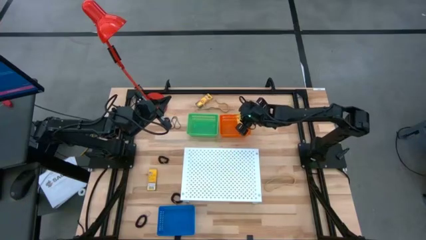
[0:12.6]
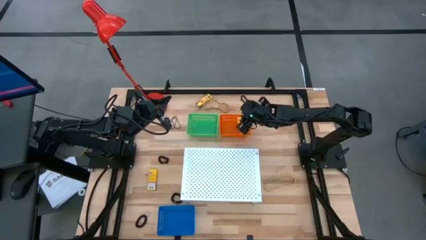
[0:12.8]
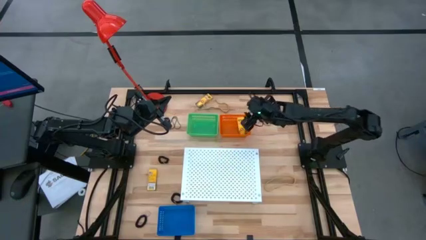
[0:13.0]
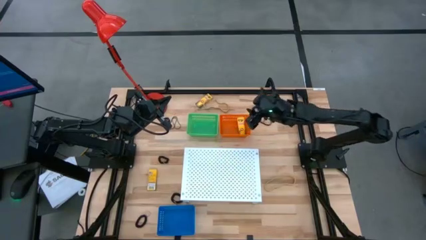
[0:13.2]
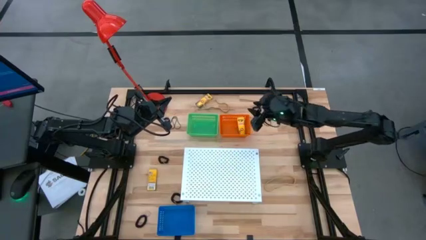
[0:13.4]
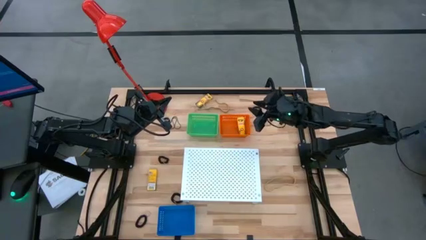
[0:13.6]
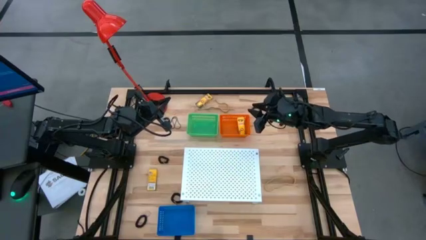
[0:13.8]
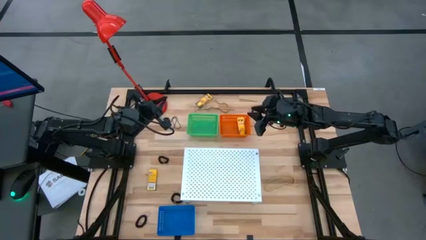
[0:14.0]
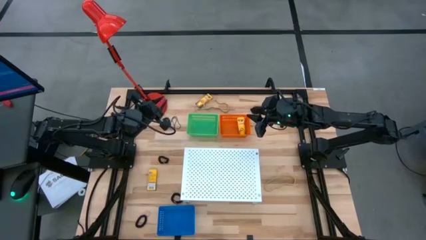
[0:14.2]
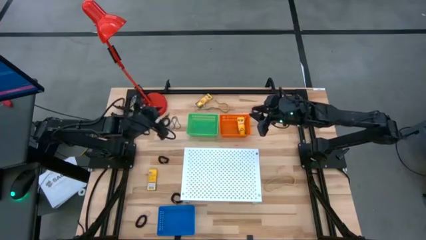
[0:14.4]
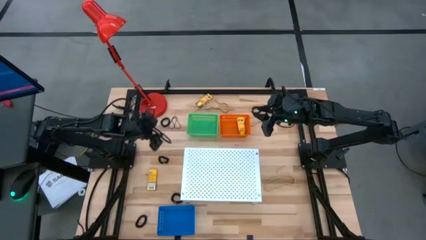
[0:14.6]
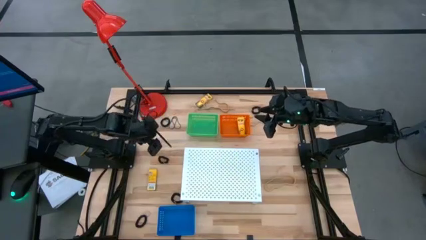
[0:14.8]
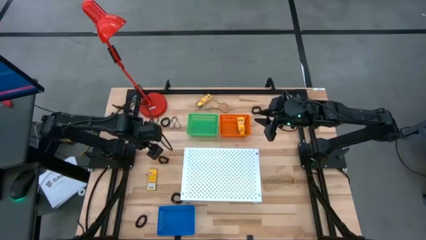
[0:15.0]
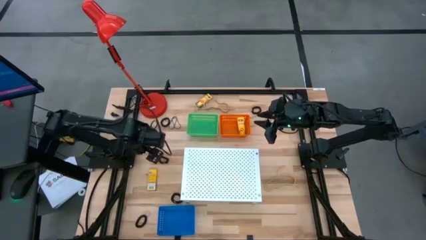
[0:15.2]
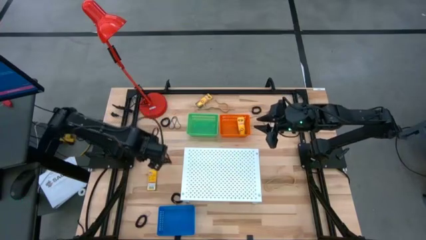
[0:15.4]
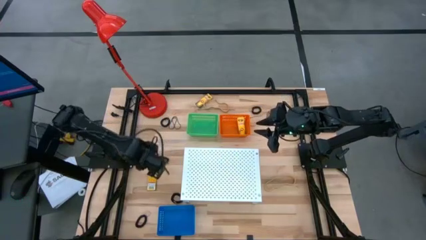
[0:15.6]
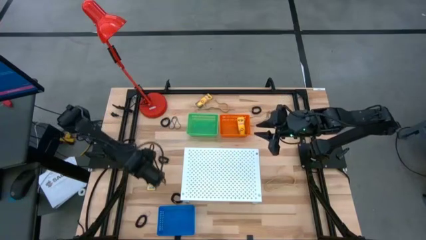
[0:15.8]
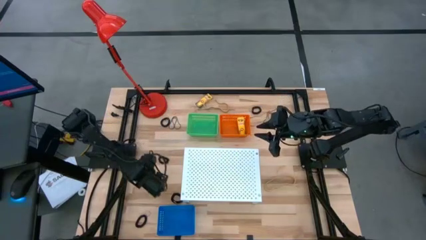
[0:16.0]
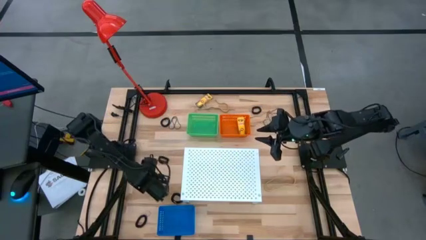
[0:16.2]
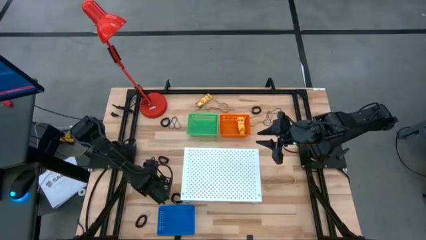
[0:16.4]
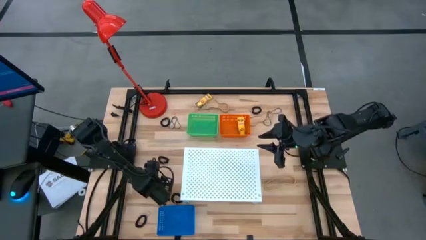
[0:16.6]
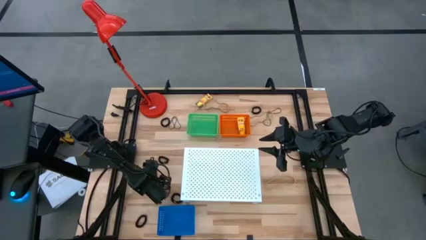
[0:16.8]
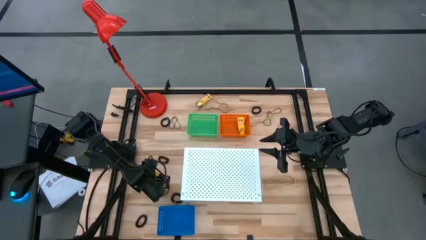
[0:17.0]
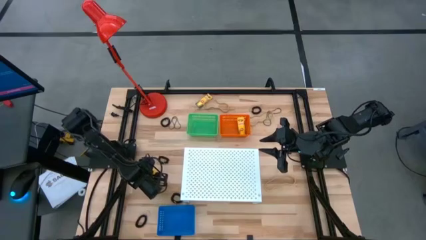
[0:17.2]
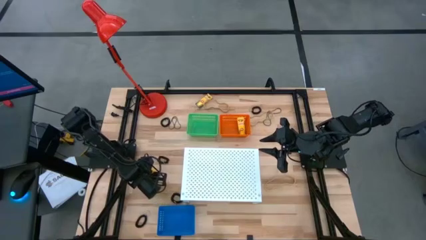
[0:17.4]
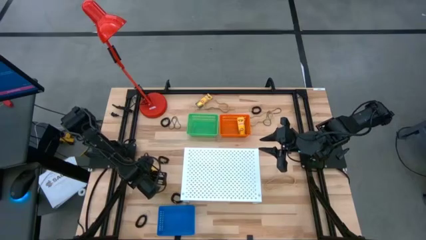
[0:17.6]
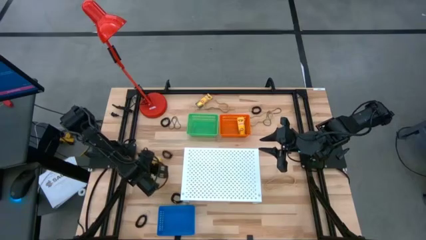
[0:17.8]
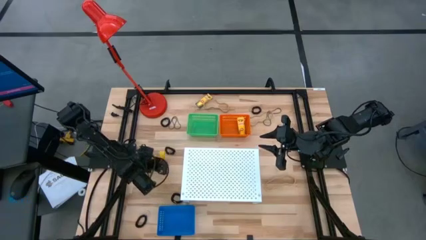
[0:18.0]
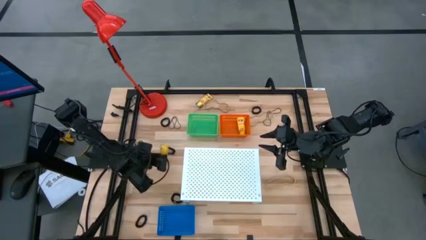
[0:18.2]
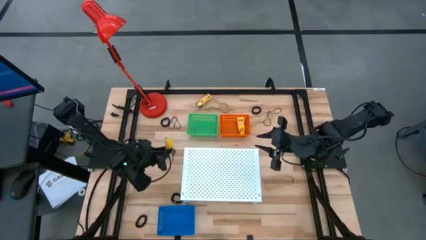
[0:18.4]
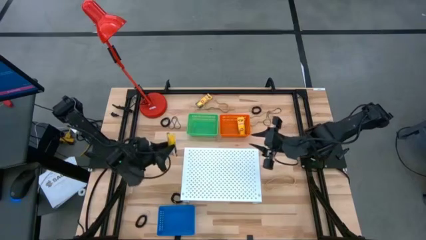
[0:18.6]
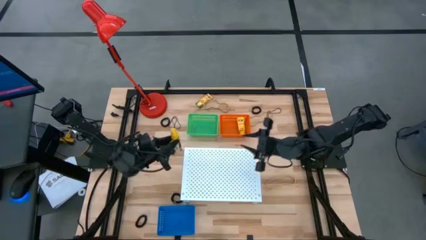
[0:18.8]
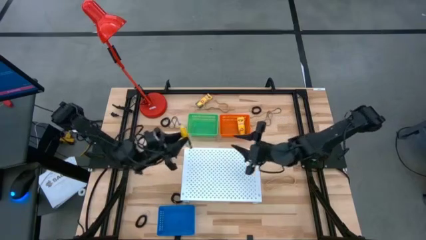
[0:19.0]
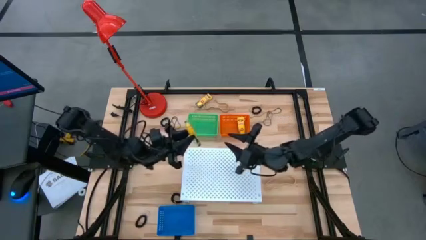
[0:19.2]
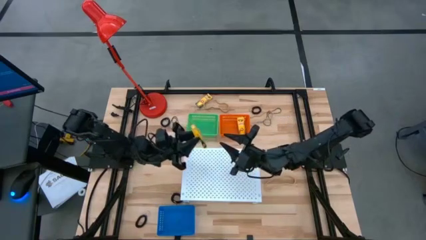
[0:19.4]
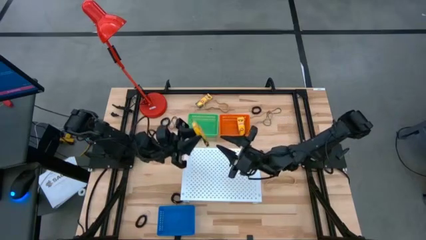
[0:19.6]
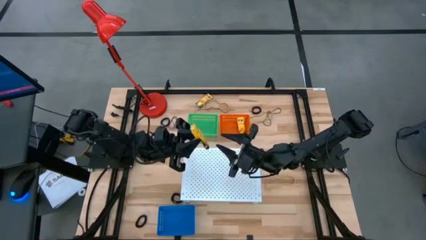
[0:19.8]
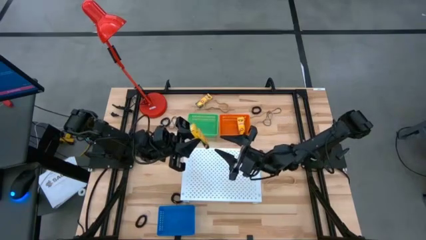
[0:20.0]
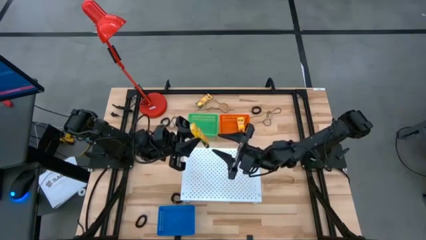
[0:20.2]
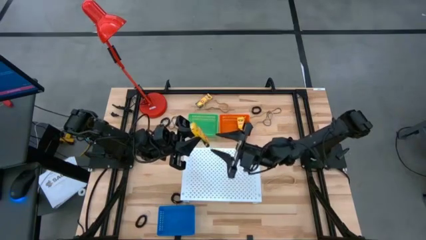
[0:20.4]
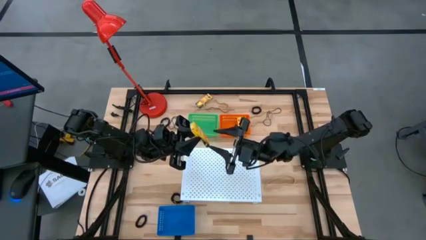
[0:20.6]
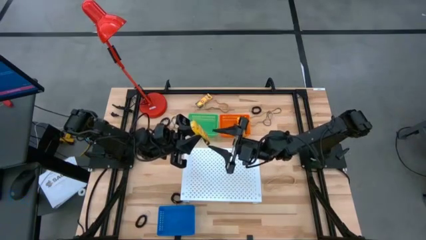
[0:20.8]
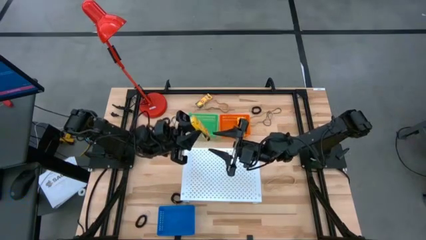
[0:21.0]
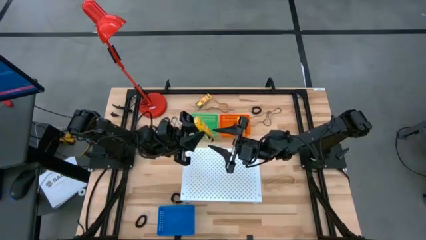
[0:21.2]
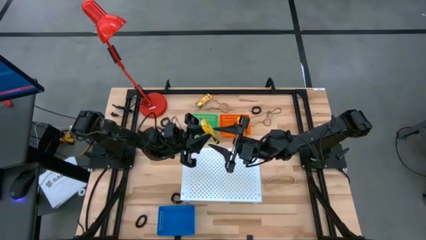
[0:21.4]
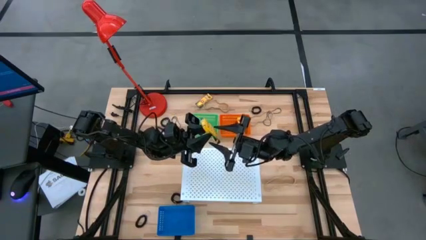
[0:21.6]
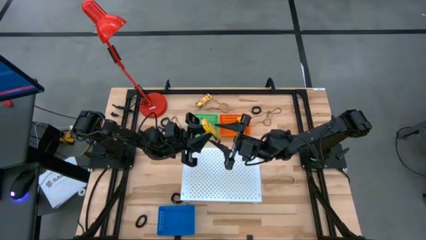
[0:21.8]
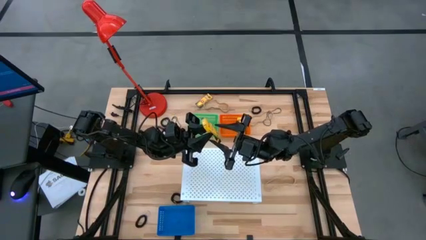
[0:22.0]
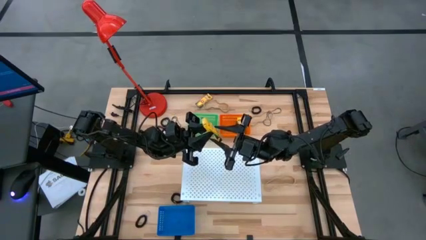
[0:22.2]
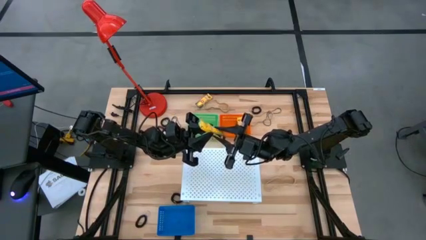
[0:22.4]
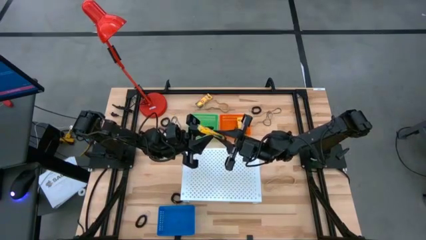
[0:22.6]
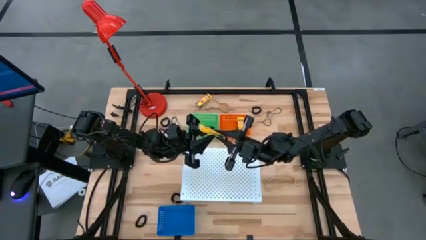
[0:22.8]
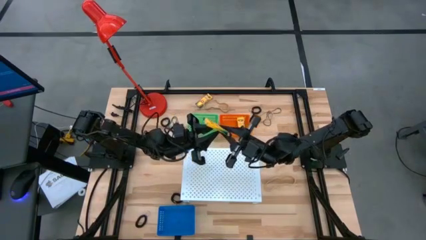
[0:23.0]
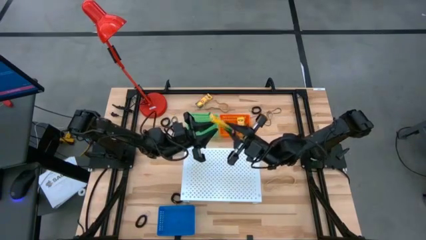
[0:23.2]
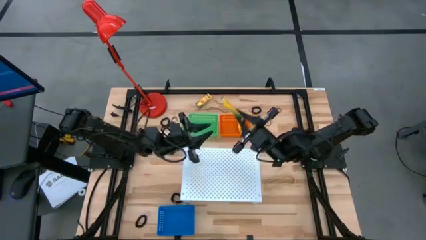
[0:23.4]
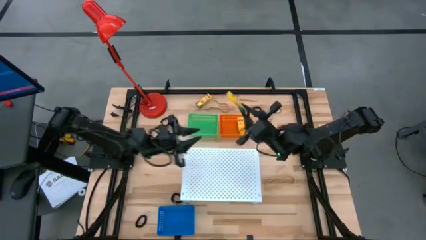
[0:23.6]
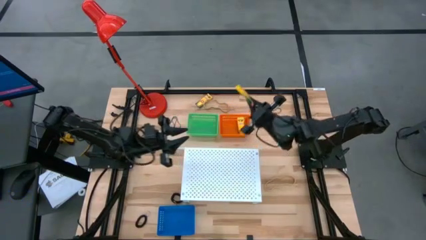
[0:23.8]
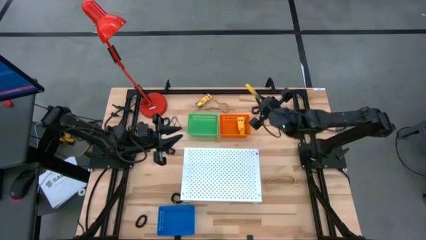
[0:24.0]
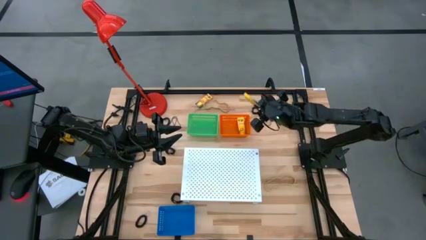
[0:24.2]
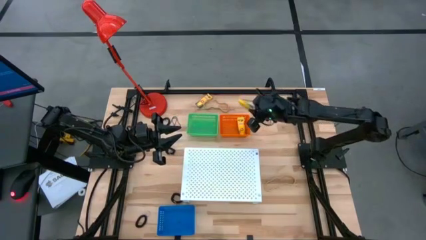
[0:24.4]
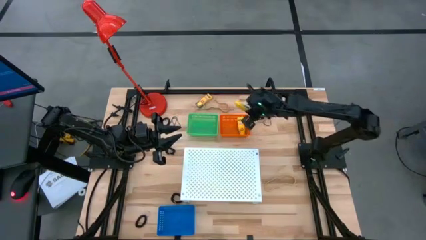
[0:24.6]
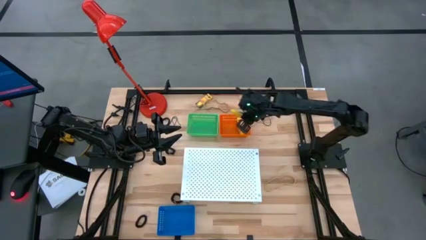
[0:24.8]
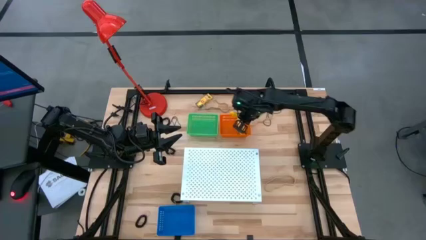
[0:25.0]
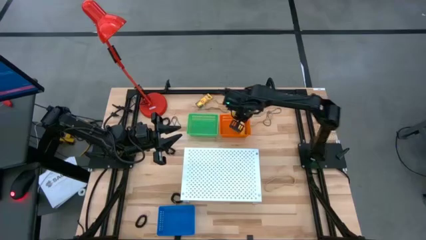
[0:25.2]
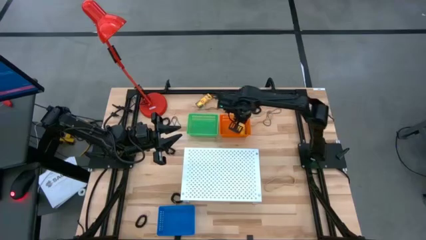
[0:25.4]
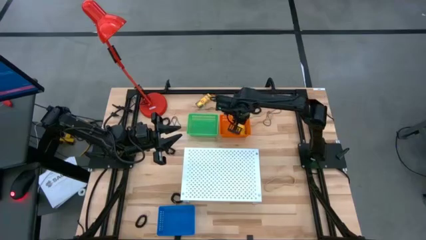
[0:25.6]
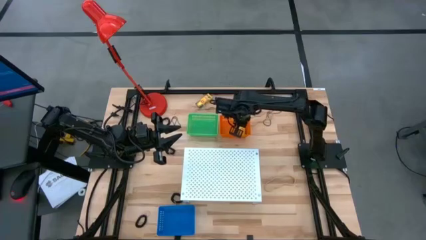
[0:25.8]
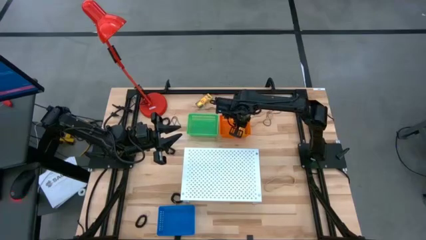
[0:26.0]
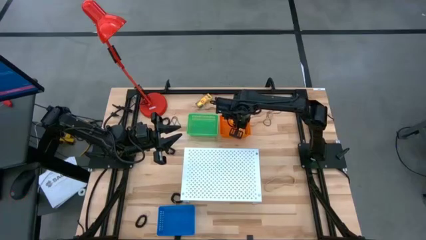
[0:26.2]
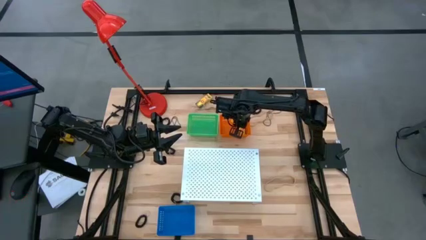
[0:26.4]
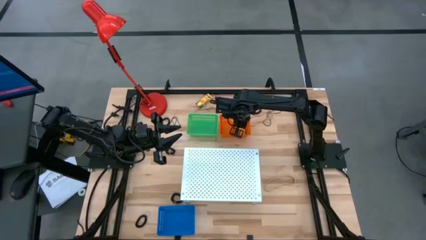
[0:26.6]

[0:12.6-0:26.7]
Task: Pick & Place Office Desk Supplies
Put the crayon box into the orange bin
